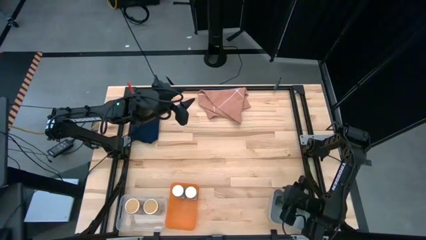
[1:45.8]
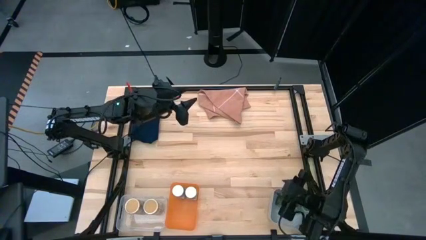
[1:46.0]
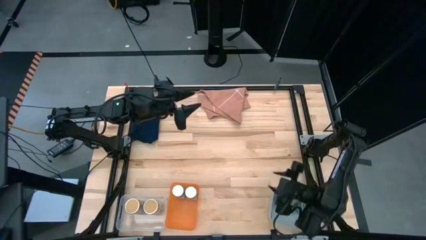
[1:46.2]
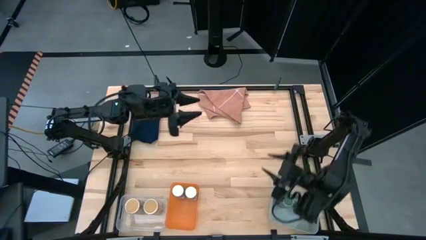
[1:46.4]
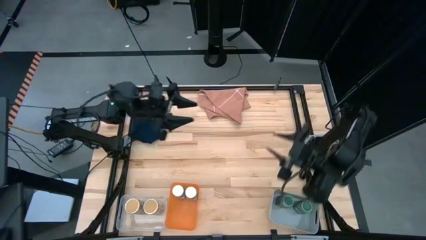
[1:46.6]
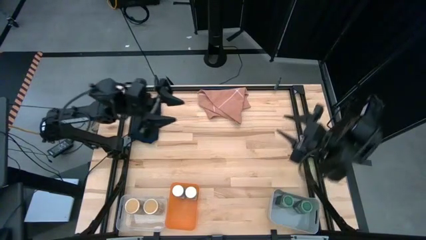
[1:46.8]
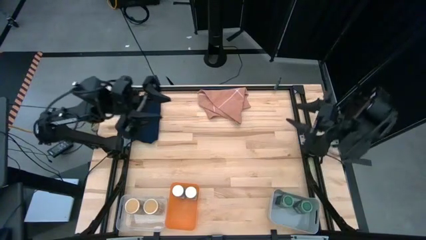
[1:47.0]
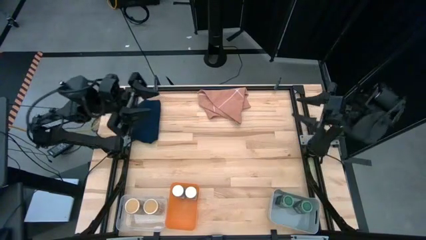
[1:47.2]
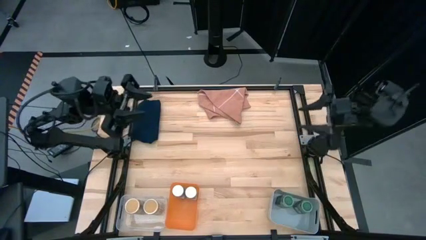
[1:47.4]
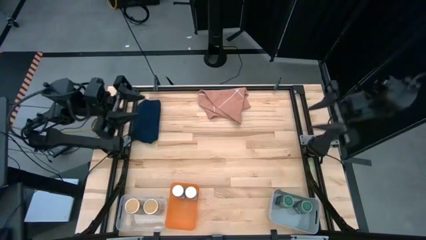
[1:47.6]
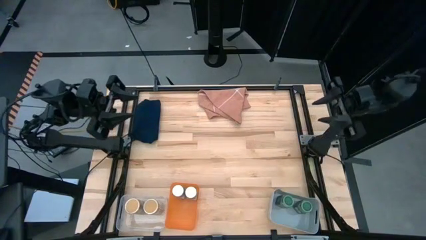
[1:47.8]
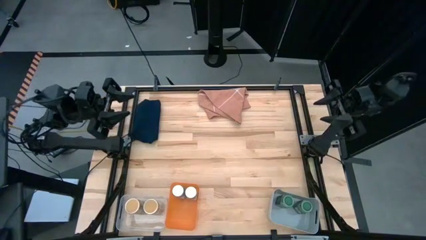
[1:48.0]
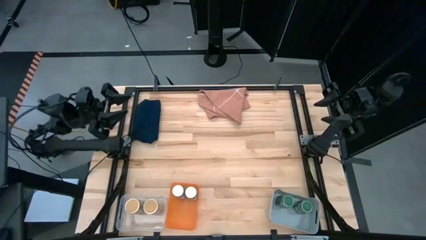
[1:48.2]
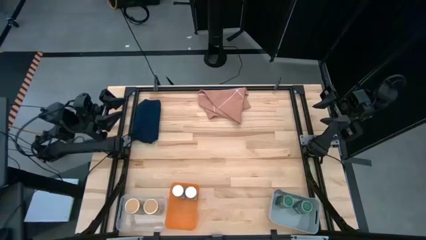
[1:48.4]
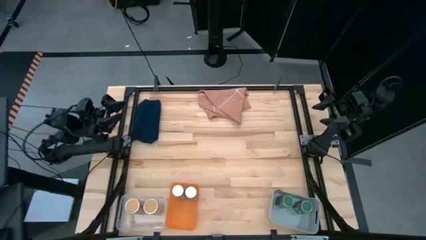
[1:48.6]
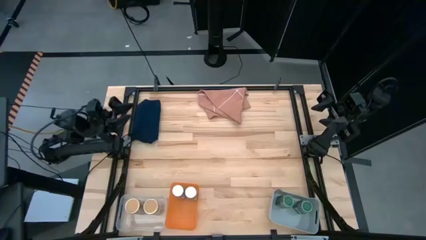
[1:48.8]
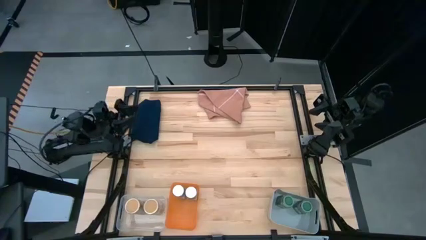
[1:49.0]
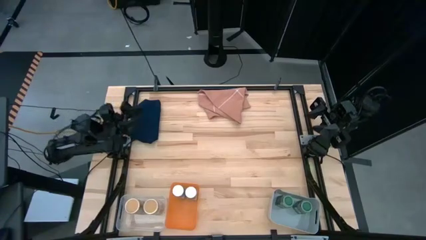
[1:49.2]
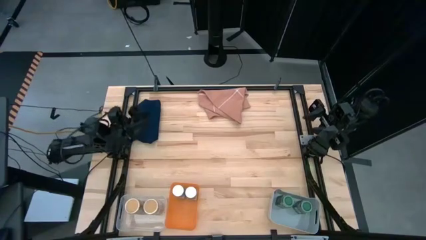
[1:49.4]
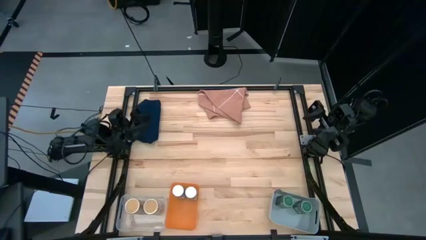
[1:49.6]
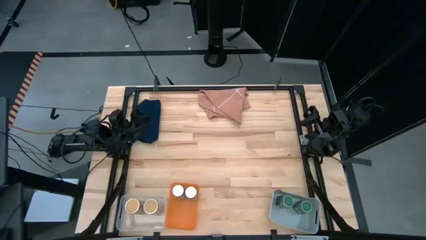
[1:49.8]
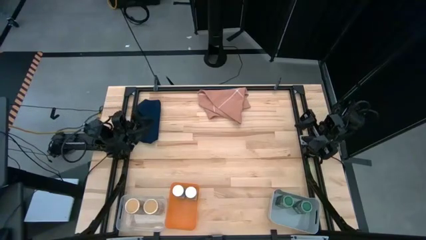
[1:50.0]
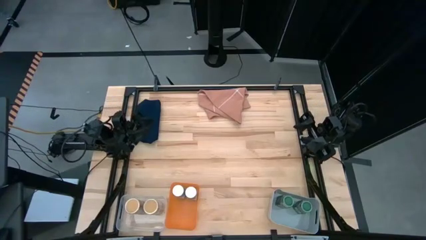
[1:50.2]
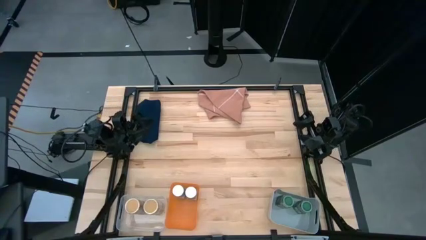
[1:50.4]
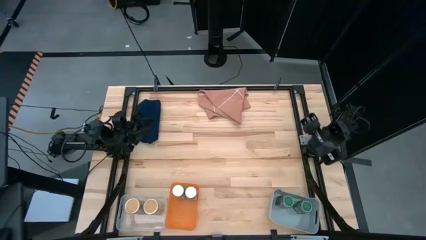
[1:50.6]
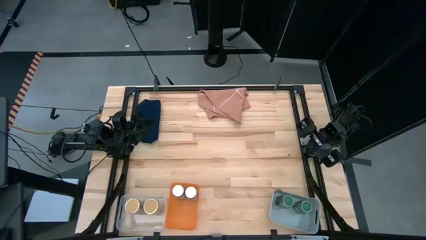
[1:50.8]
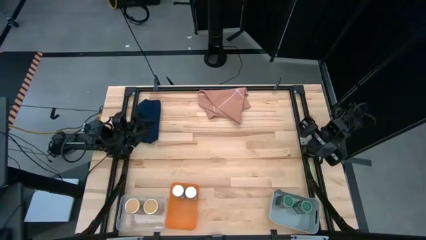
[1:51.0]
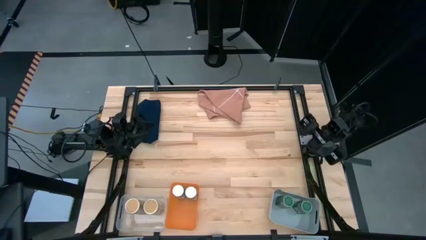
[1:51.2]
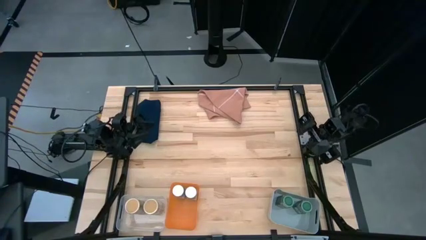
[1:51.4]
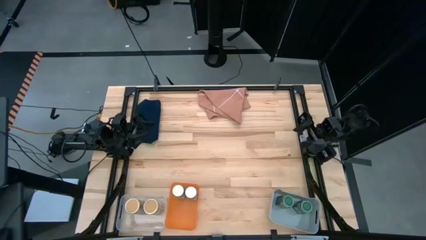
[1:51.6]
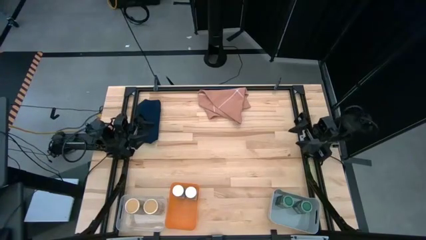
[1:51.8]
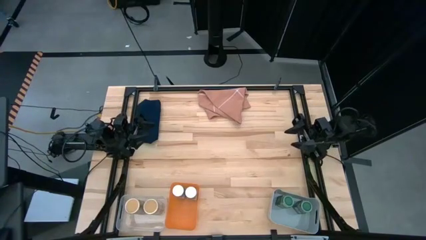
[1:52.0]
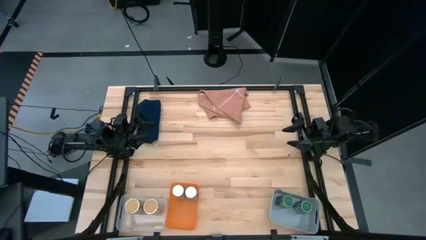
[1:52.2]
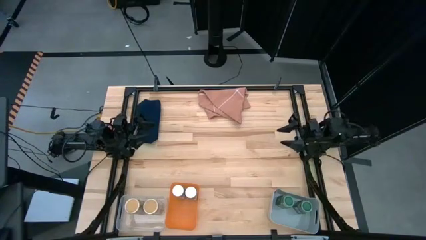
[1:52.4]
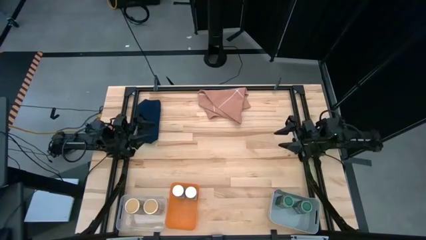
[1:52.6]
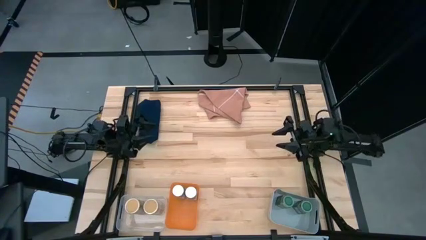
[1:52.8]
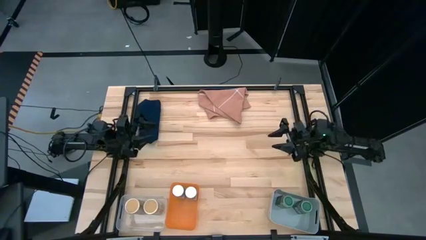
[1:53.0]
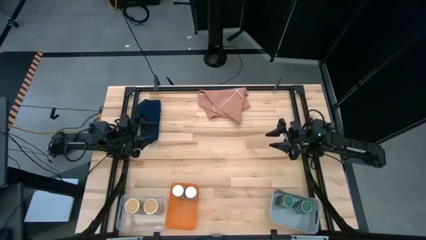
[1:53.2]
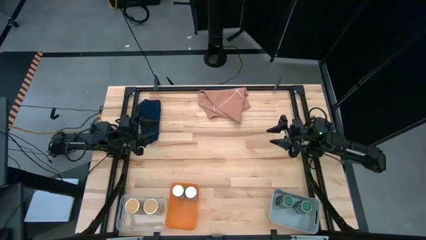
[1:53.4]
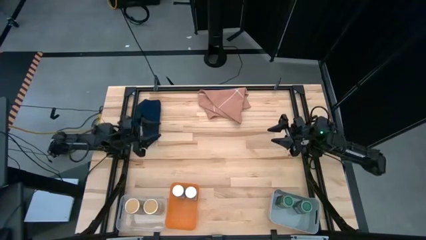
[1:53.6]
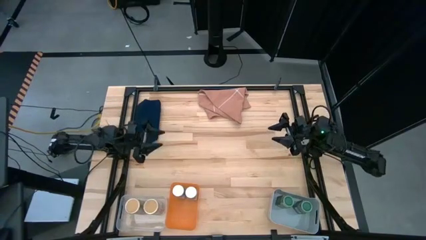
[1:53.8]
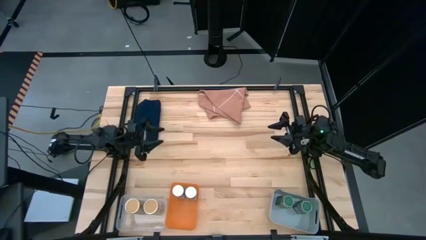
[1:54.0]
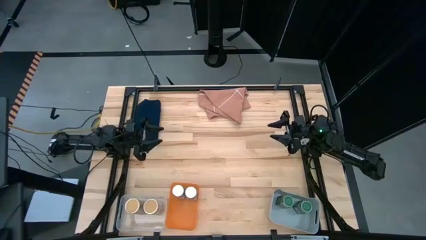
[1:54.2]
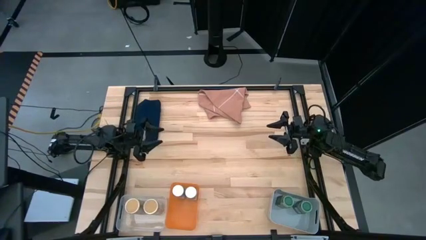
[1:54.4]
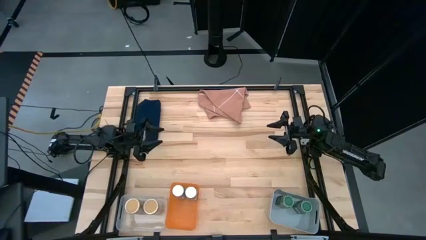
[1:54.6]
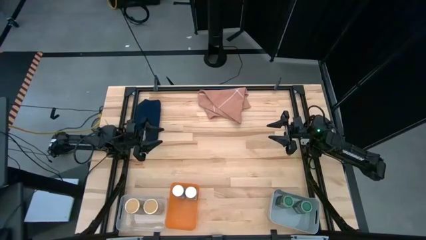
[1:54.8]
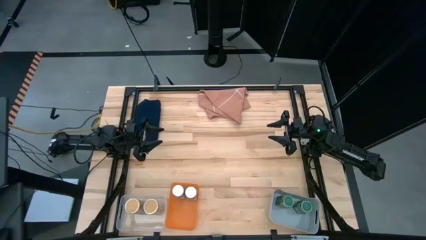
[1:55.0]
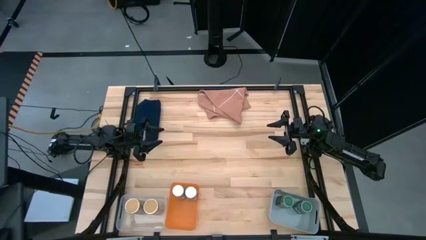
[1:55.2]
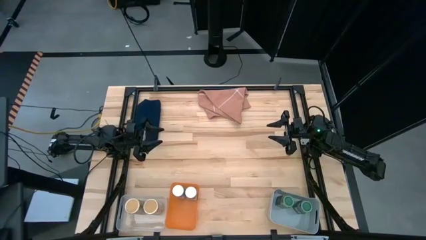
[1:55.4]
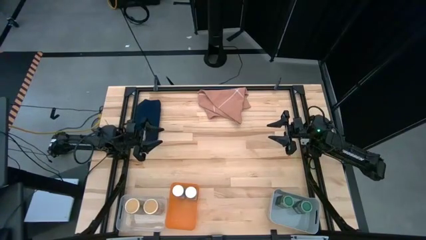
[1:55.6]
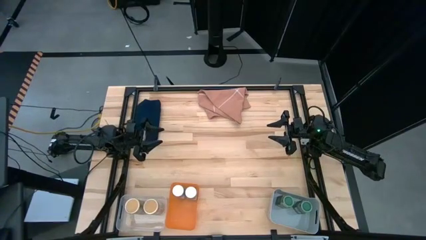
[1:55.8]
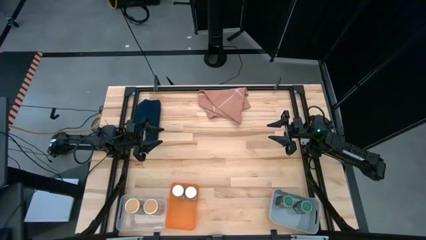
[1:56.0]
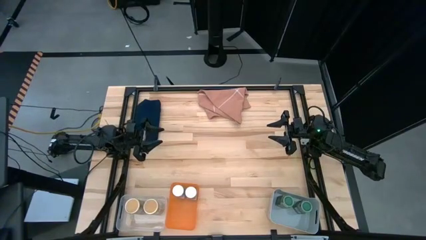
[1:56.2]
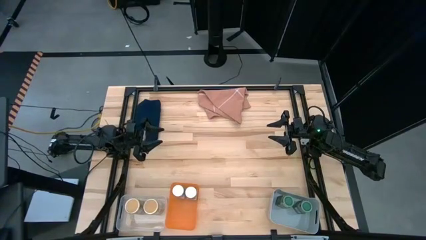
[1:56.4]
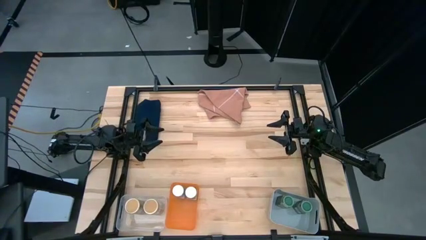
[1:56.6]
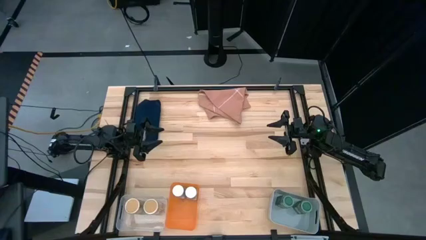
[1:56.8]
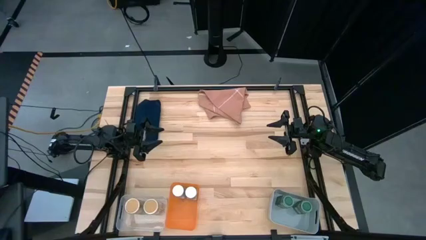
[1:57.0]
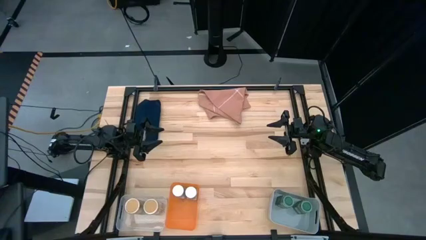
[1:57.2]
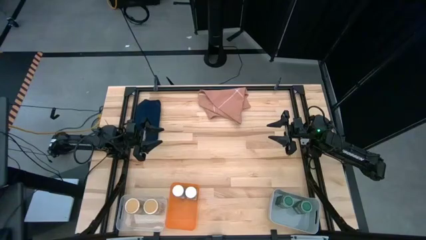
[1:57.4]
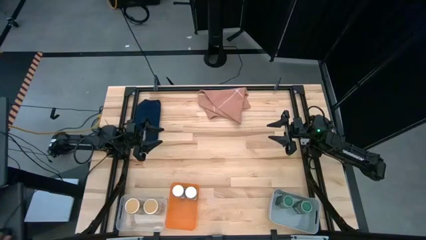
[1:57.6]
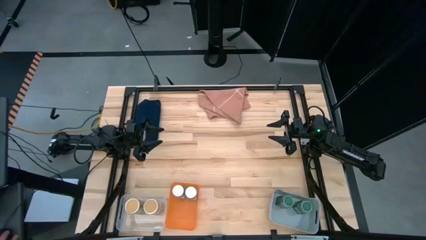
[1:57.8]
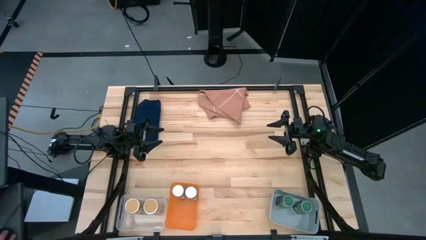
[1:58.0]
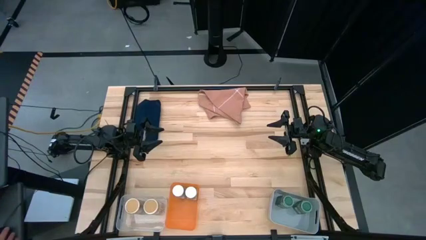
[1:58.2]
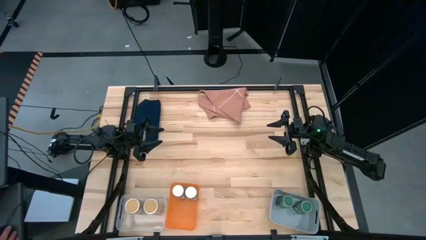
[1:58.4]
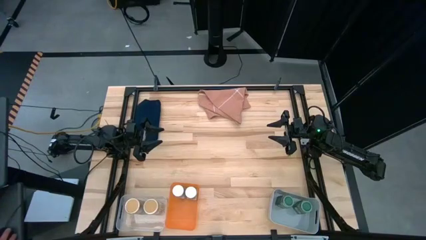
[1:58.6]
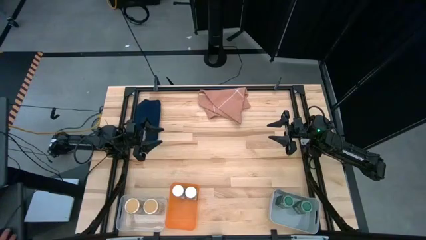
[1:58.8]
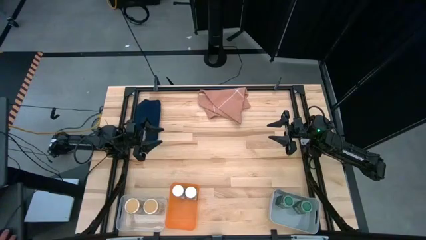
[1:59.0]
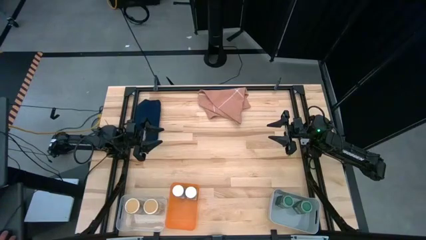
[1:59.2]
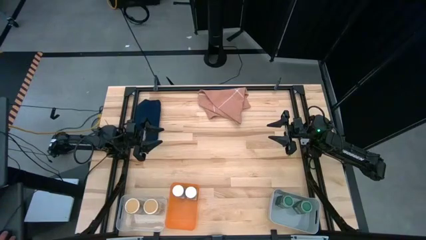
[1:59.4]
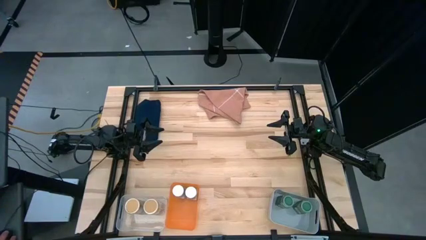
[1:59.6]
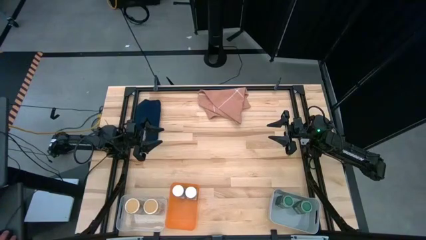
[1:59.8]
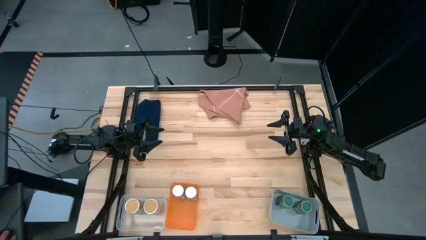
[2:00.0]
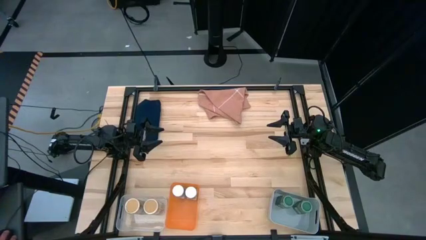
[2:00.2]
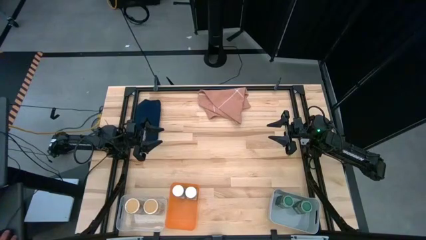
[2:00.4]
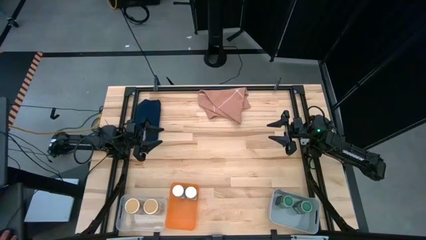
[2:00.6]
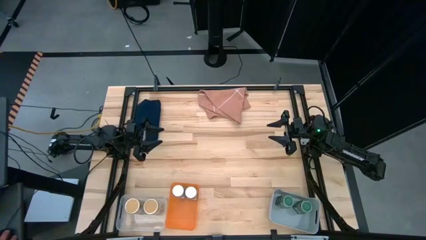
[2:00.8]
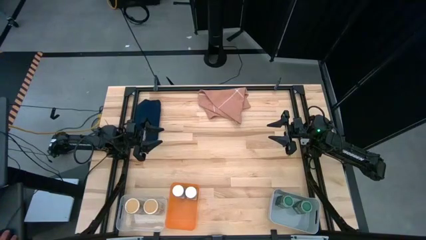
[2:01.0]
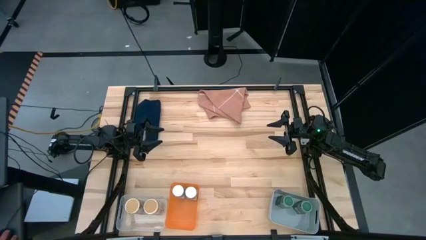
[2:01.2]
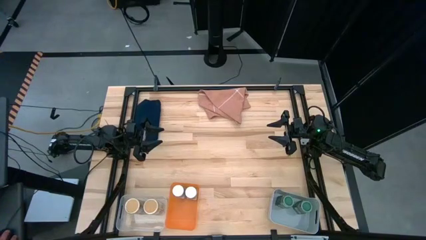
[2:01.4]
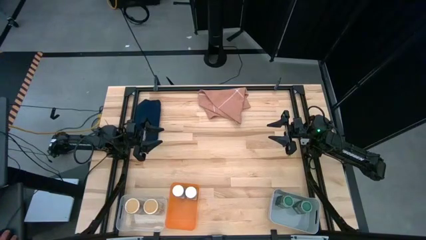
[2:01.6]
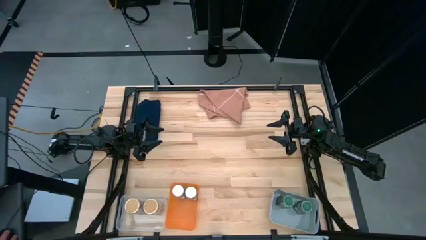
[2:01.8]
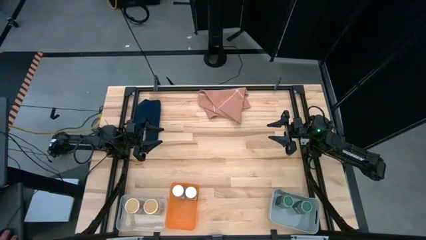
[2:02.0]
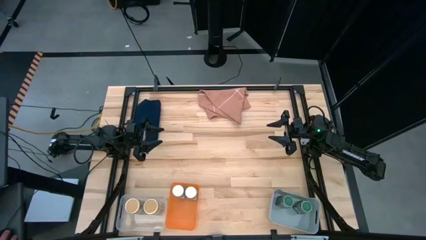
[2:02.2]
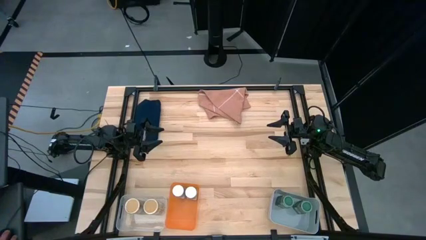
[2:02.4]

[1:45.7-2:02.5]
Task: Sort spices by type
Return to Home Position
